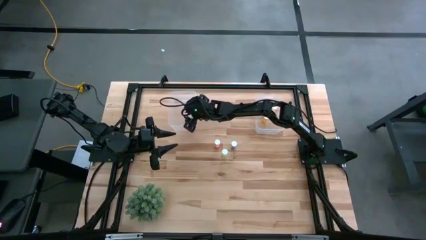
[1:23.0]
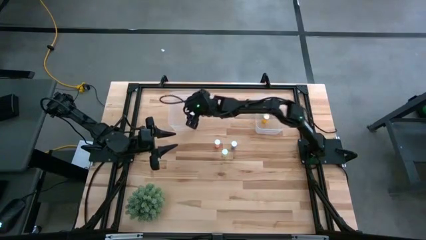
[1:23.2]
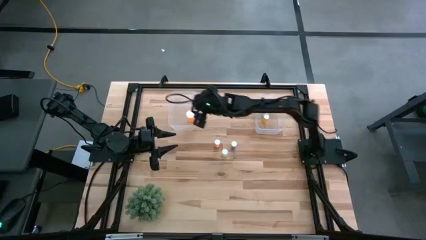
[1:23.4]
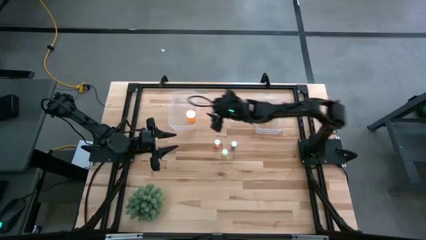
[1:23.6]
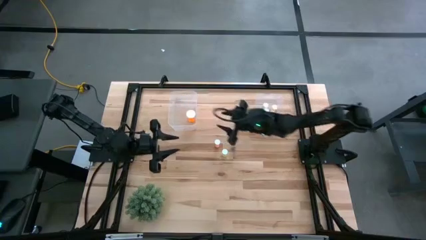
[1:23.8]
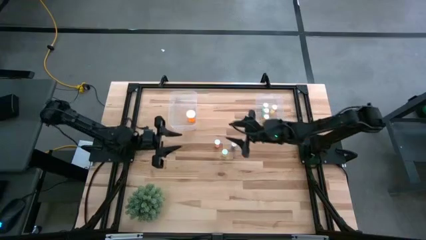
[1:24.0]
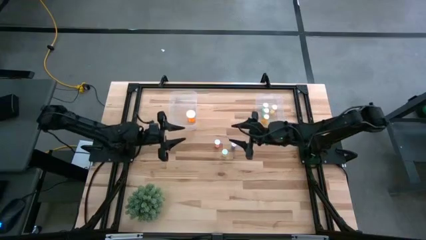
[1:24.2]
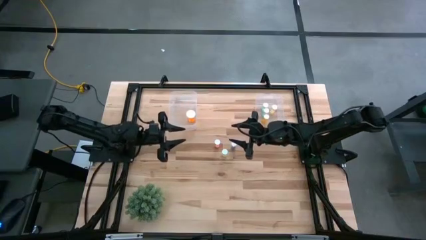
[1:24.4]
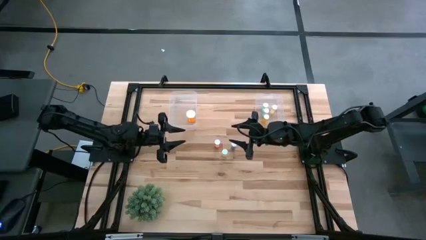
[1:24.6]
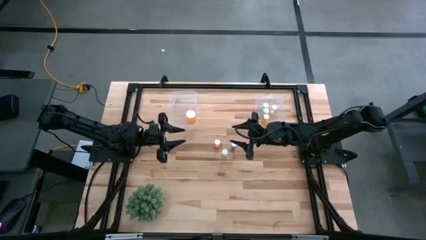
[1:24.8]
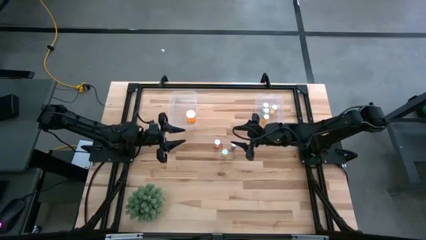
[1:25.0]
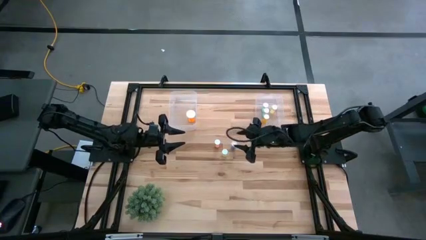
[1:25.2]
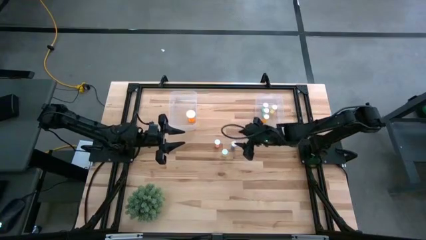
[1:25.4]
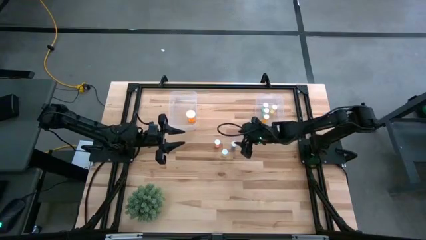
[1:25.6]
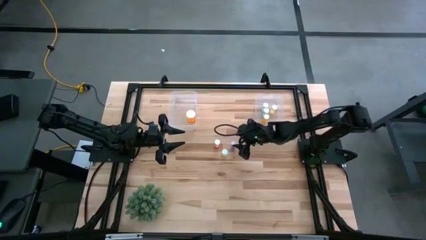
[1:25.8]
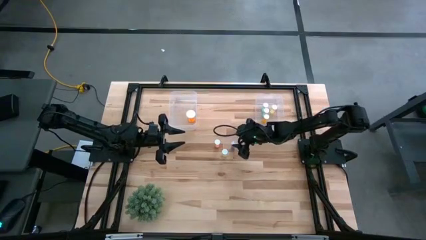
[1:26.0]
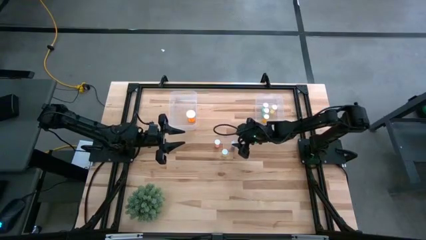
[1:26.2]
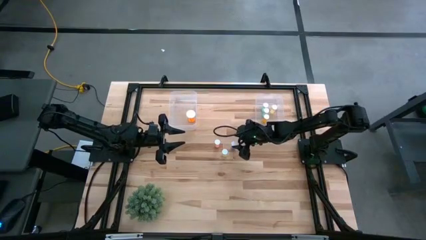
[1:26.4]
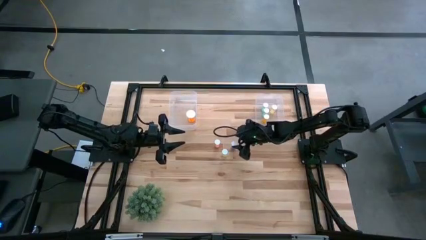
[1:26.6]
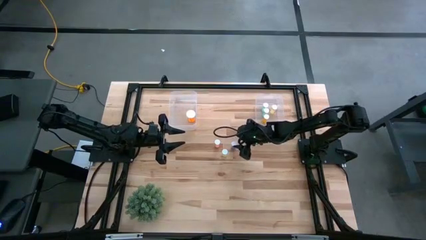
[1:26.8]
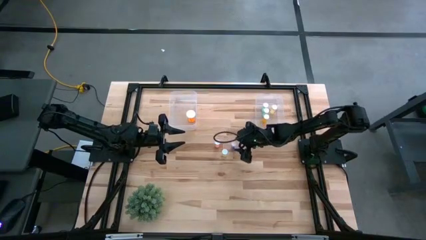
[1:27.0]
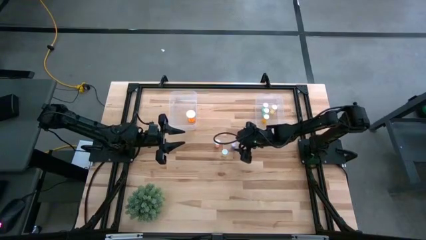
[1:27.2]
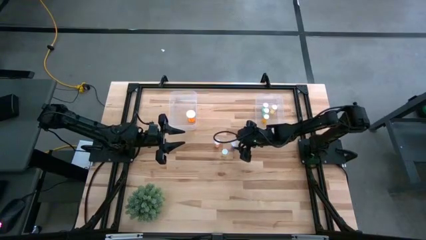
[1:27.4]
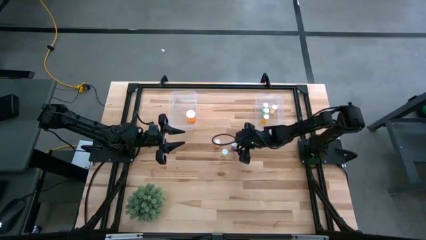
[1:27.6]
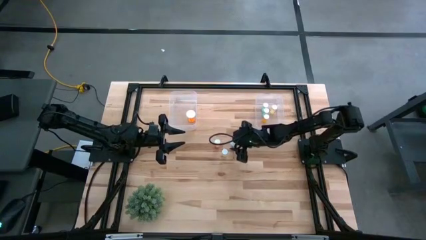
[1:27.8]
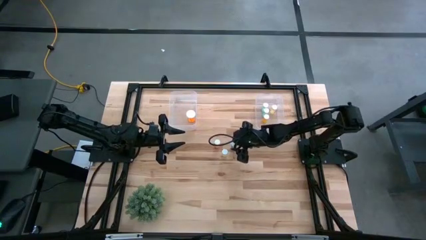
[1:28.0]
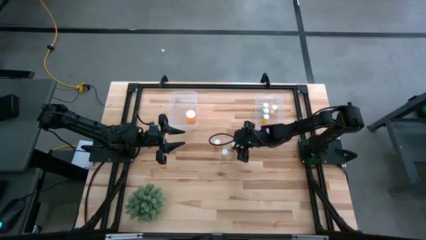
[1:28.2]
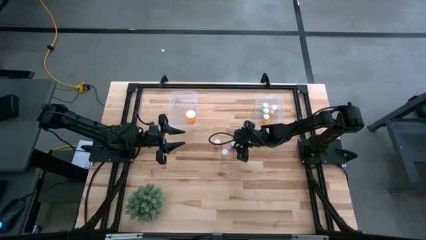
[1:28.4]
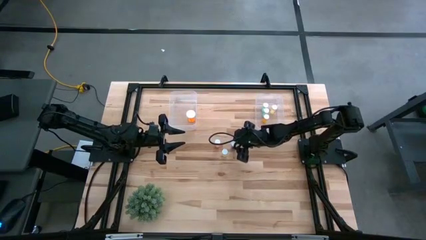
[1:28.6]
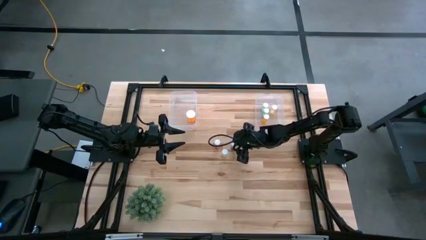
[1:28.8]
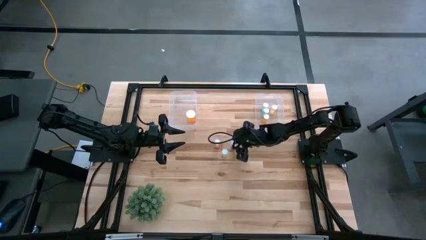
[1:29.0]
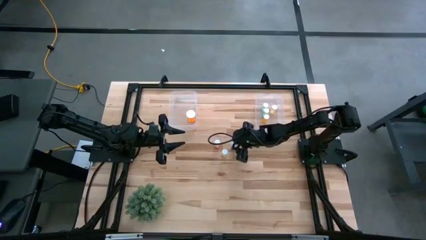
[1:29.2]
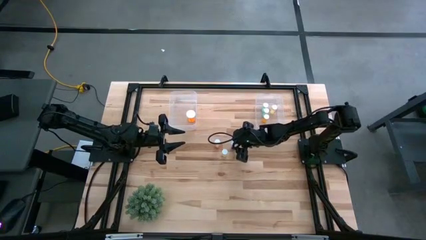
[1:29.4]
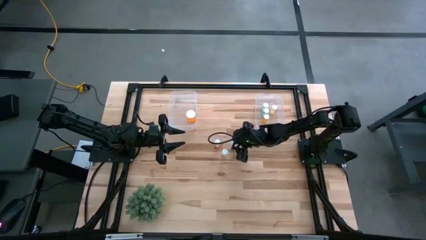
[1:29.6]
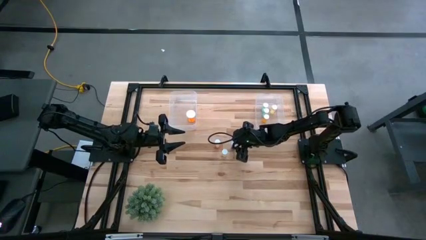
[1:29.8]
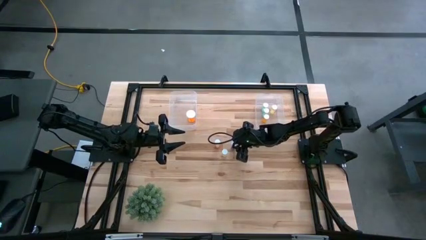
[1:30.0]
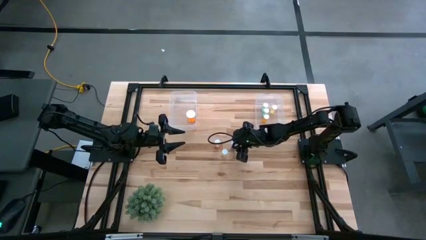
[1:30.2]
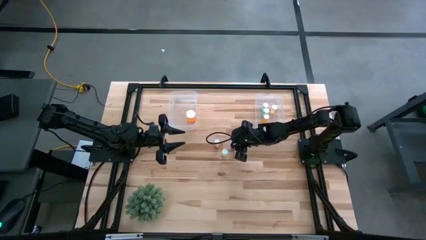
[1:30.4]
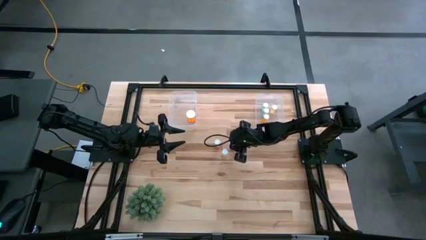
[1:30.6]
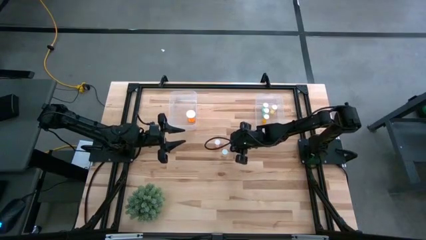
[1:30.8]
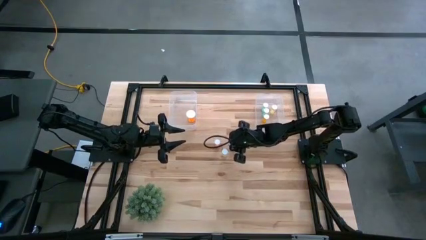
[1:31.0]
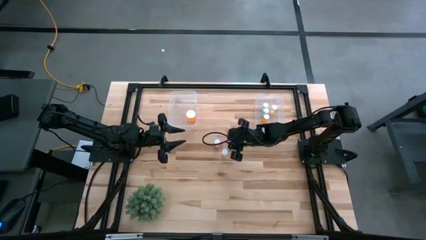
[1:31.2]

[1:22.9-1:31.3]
Task: Pick and place medicine bottles into bin by pill shape (circle, oval)
Put the blue capsule bottle into the left transparent bin

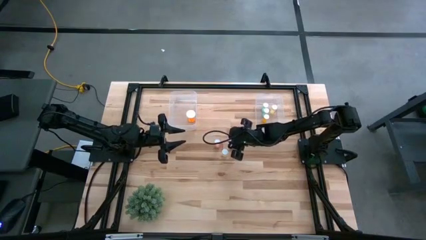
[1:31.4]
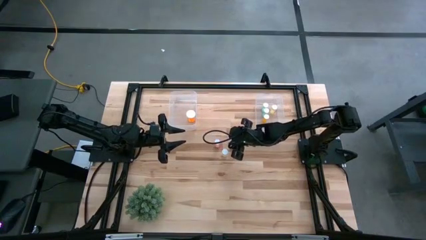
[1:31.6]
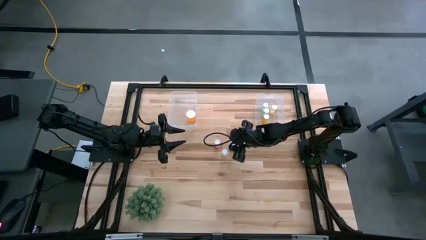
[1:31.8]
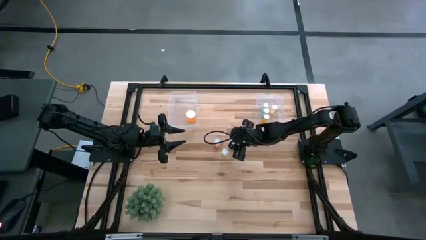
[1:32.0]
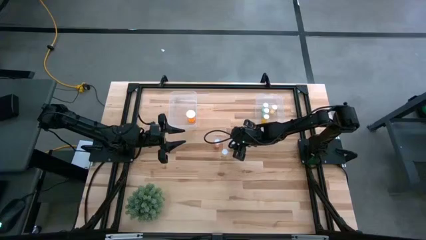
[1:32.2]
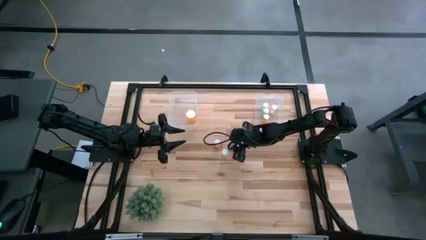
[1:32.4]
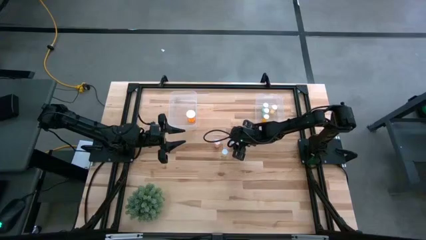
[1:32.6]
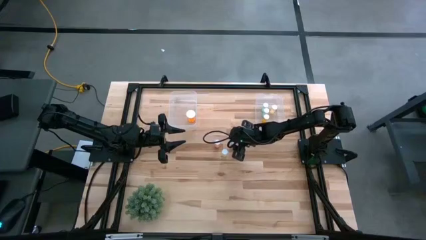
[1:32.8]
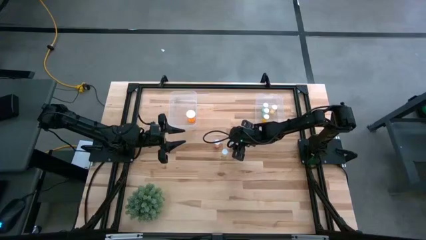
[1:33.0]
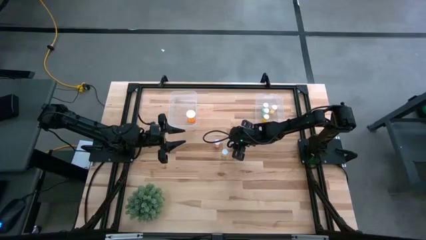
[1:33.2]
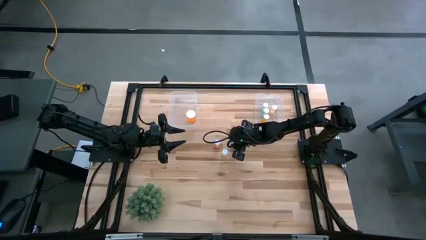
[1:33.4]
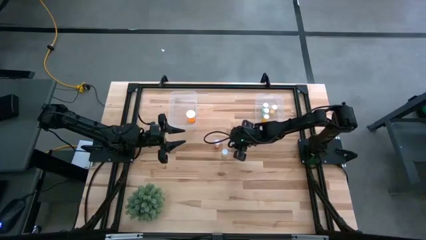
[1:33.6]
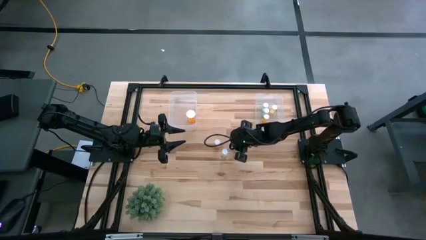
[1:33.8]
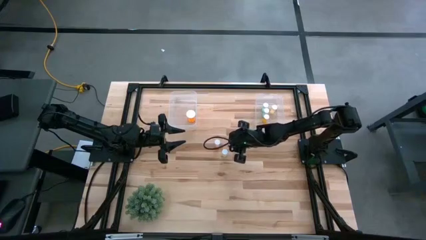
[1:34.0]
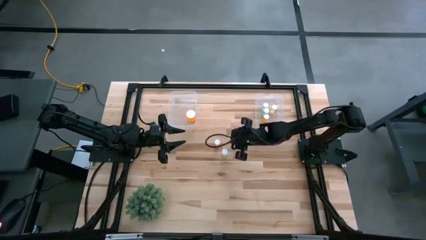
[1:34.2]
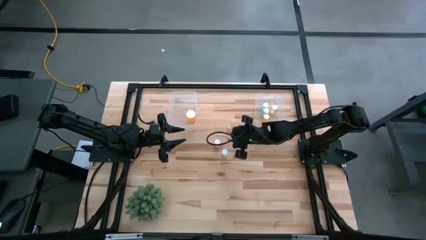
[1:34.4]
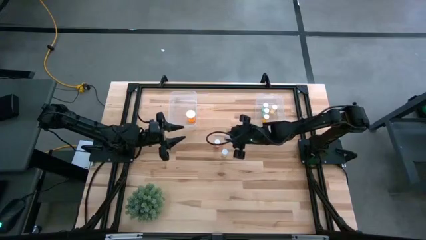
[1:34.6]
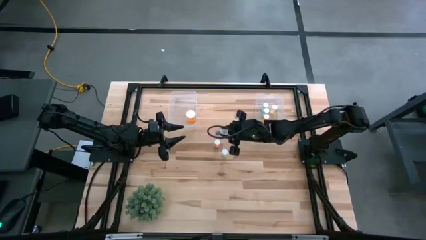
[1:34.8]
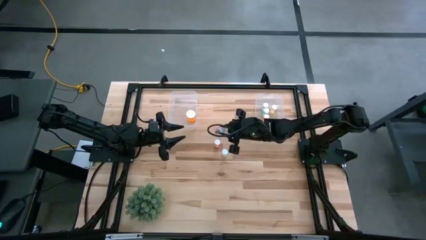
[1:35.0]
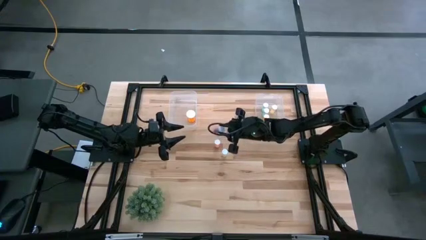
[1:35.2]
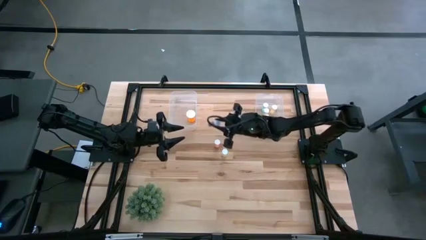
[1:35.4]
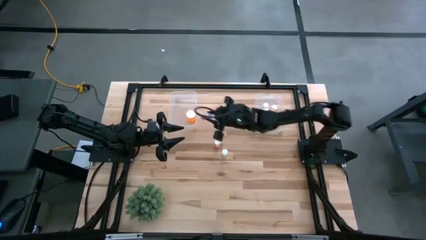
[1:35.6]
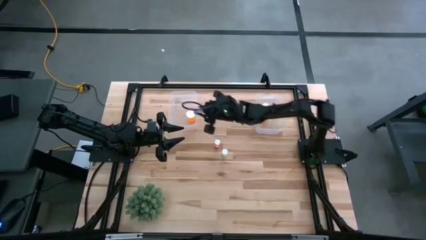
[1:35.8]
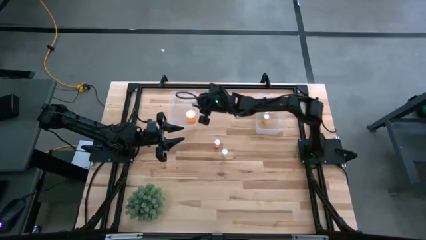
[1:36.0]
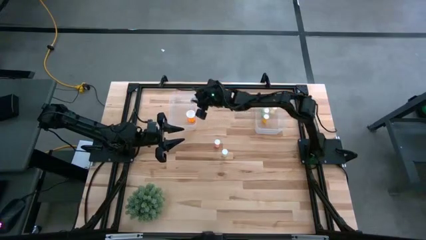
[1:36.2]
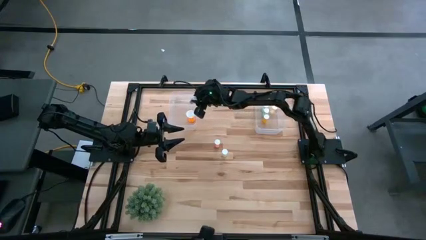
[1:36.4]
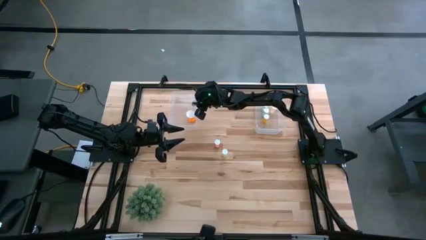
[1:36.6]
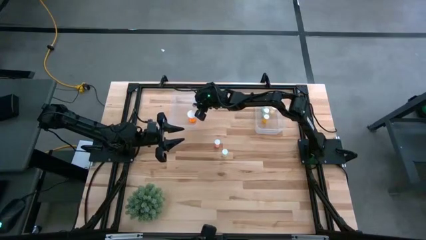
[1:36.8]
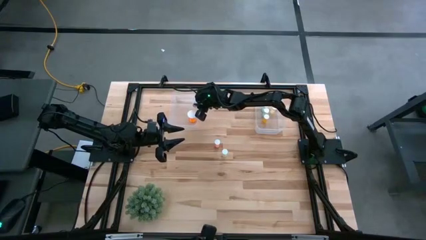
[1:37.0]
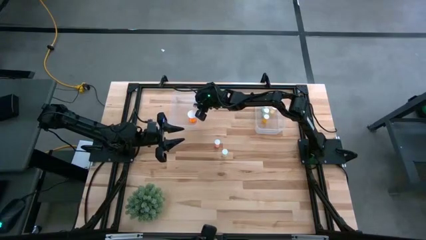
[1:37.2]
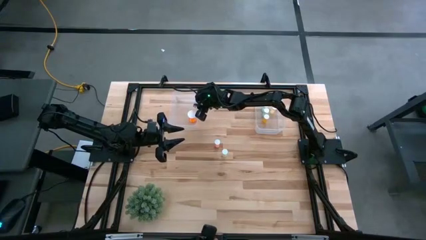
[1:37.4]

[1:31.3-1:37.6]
Put the blue capsule bottle into the left transparent bin
